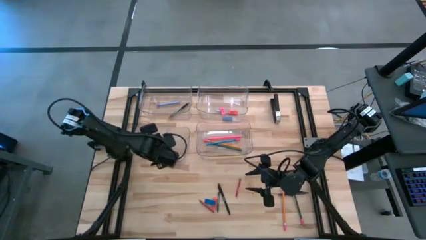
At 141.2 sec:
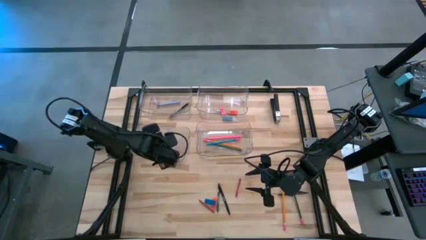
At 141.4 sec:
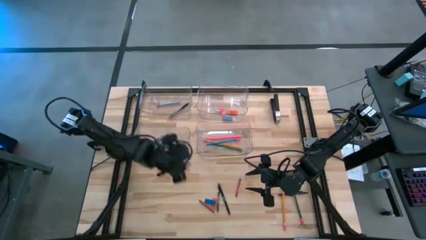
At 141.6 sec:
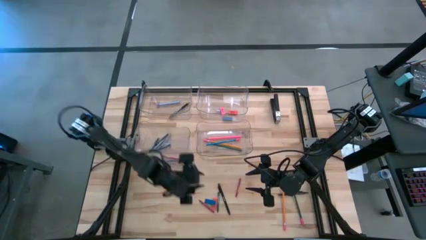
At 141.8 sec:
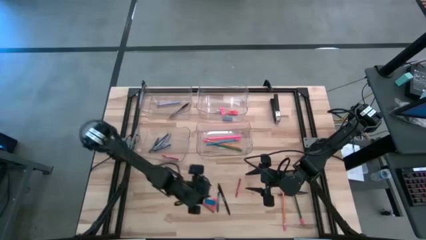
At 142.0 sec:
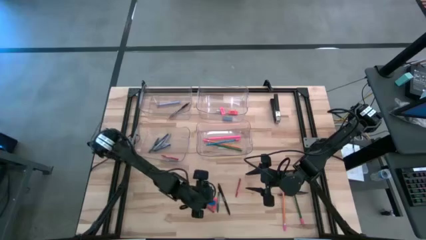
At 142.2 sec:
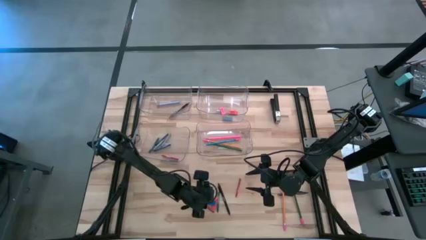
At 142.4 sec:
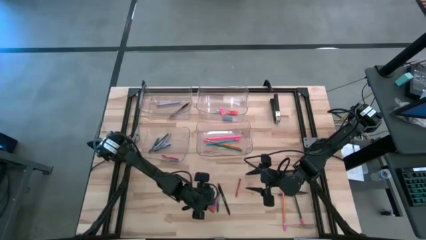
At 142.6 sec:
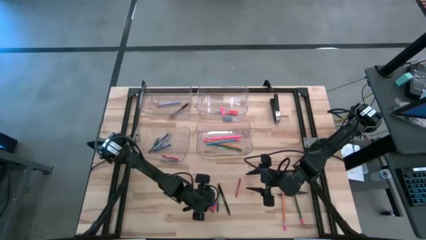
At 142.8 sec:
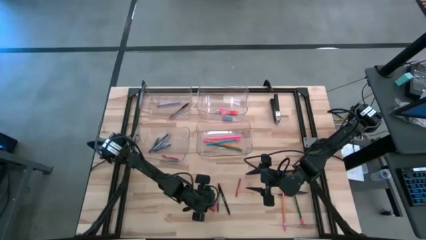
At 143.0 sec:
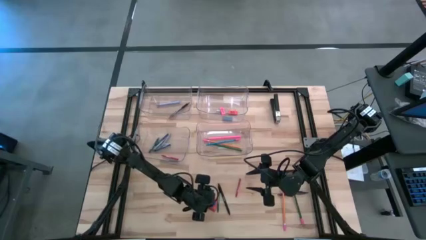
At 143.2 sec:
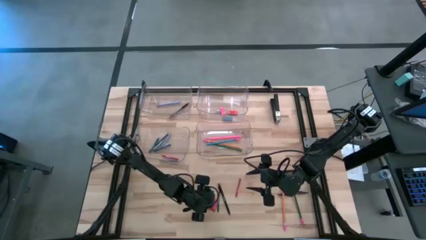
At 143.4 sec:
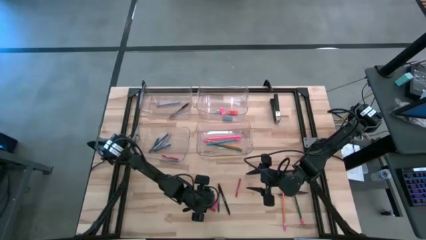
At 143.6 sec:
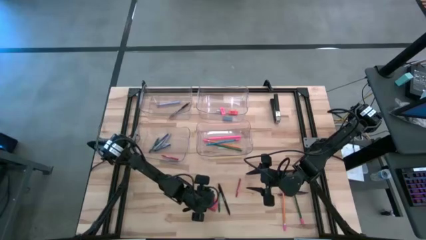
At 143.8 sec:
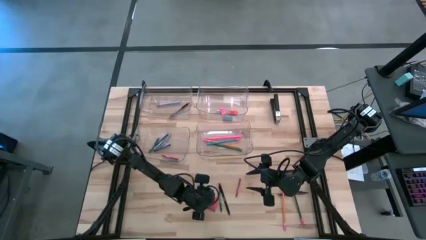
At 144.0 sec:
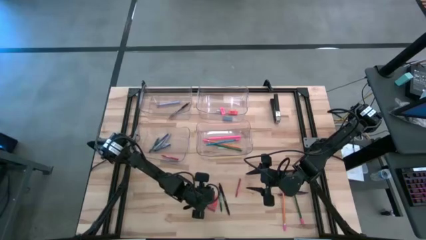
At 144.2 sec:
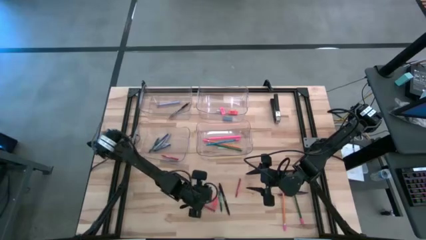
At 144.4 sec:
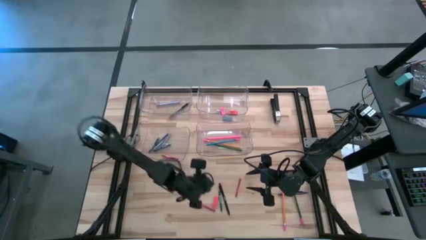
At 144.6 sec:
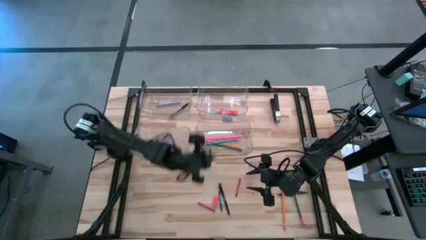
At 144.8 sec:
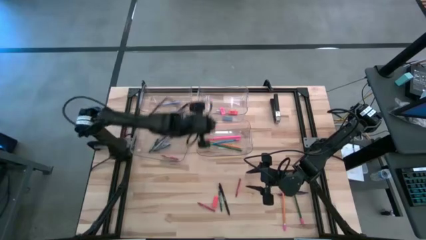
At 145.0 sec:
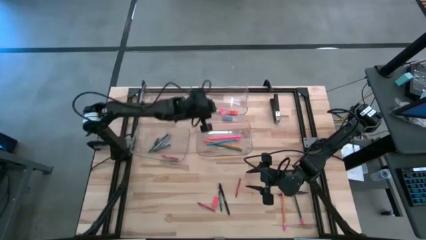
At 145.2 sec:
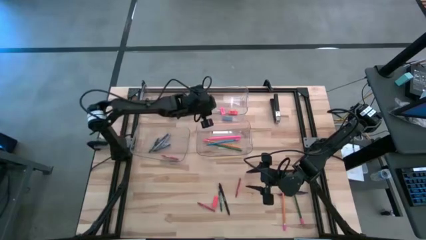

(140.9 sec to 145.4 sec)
Task: Sort crayons/erasers/pens/pencils in bins
Put the blue eraser into the top right transparent bin

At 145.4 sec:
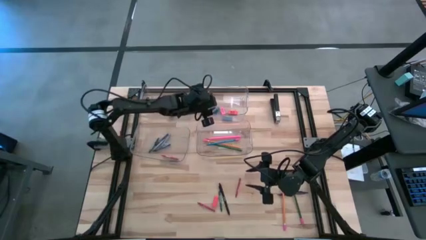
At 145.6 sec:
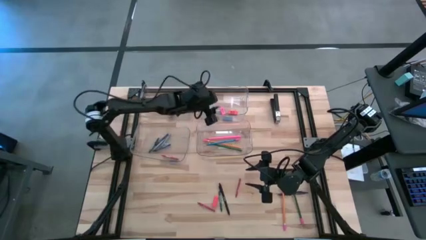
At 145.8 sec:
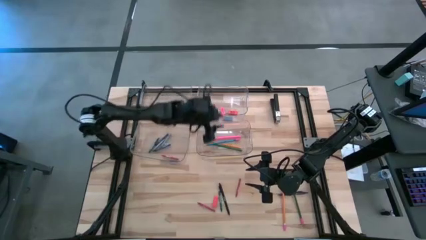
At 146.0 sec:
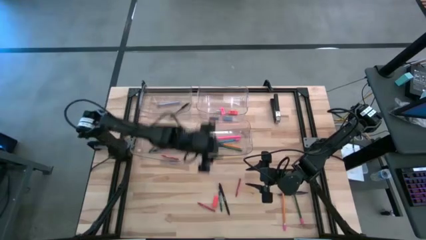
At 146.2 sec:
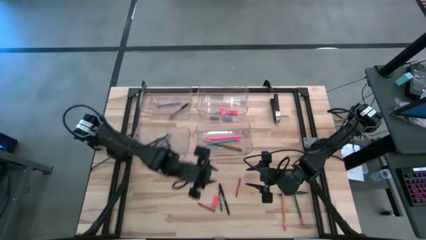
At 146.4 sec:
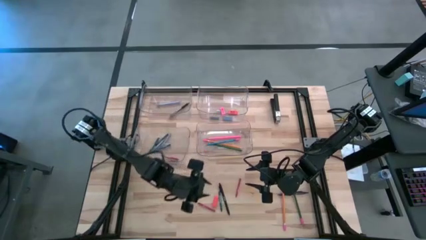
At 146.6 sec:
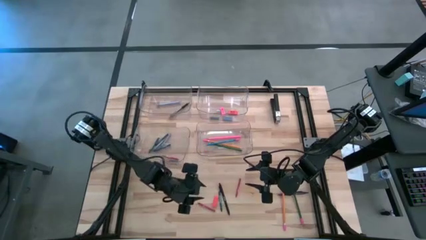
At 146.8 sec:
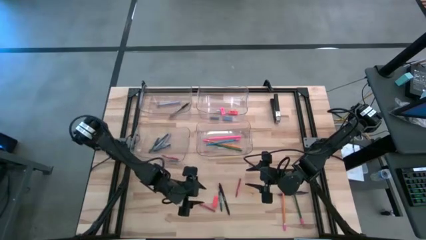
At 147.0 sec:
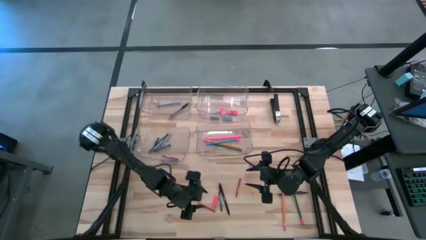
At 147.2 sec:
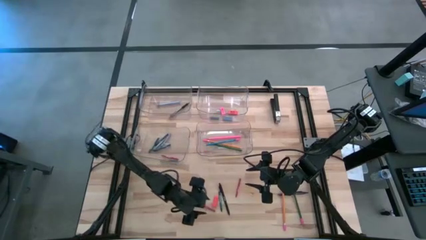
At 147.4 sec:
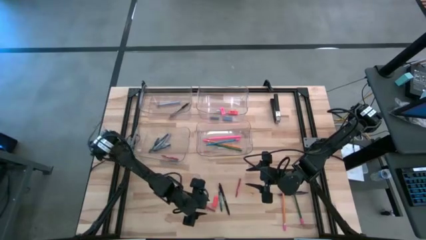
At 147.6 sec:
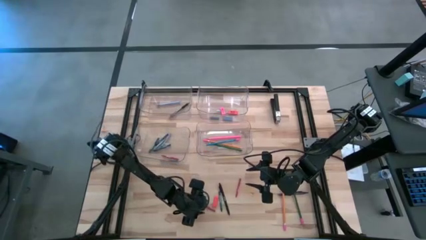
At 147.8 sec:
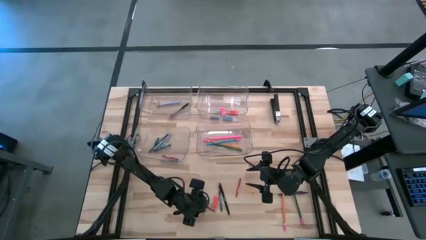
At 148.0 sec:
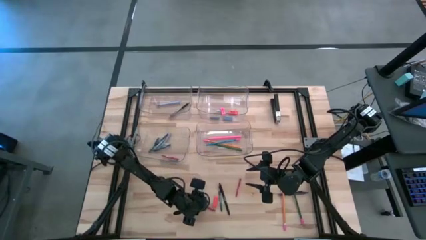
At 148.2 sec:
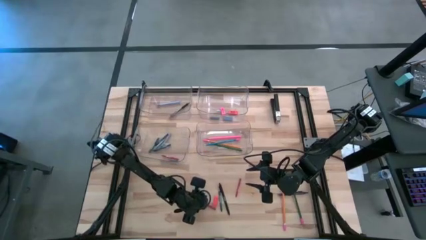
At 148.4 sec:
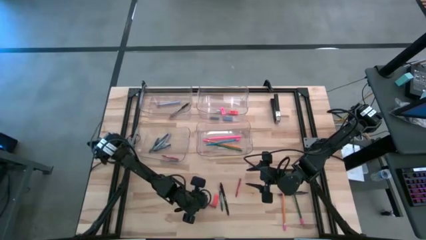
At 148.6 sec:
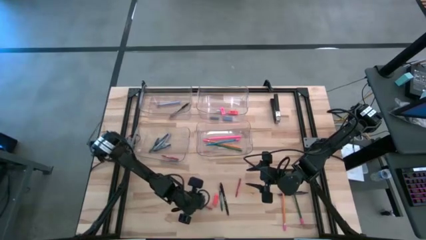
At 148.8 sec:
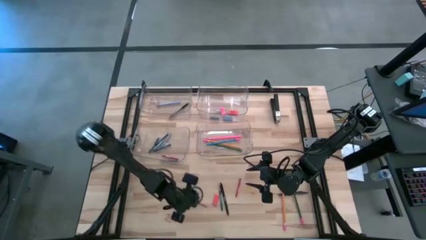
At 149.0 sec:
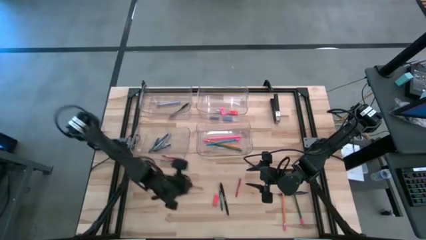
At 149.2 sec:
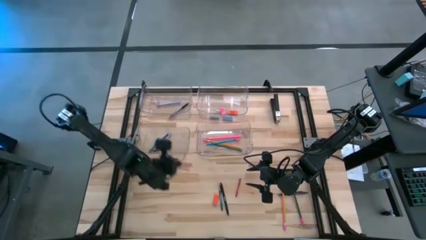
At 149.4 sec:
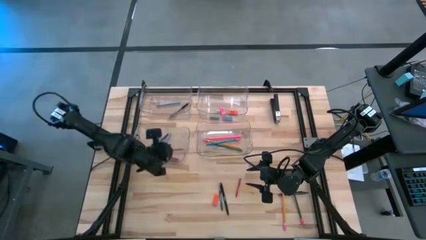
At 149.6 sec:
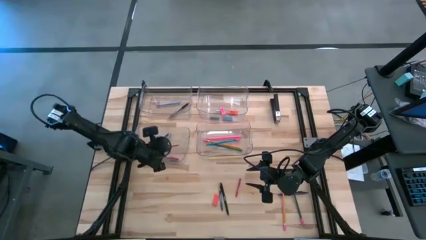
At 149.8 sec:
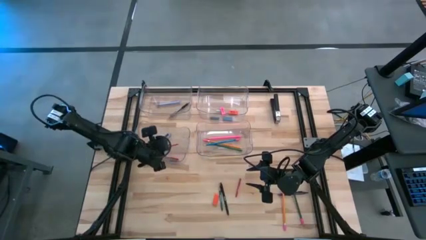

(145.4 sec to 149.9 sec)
Put the left red crayon into the bottom left transparent bin

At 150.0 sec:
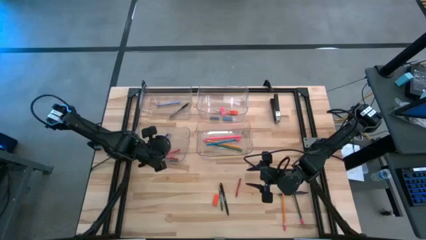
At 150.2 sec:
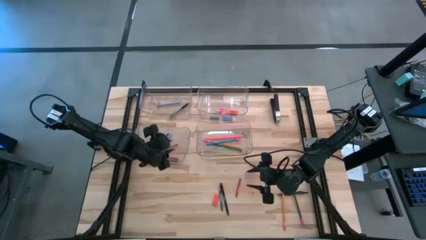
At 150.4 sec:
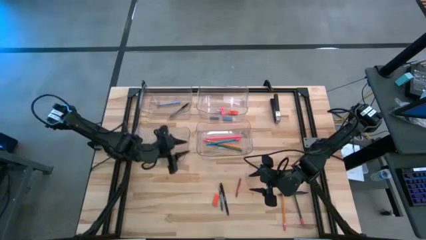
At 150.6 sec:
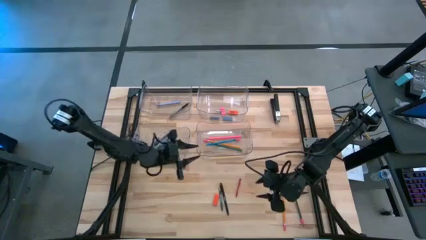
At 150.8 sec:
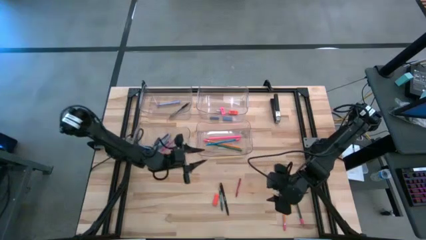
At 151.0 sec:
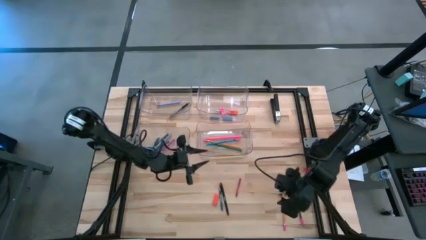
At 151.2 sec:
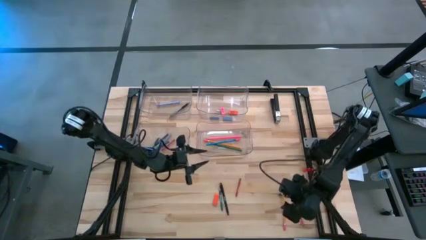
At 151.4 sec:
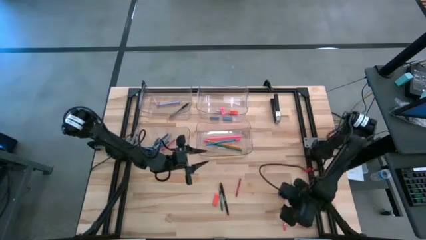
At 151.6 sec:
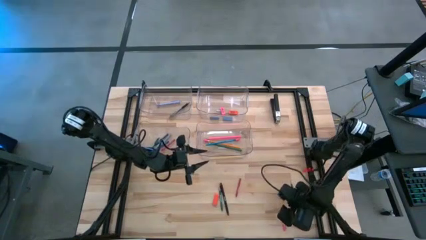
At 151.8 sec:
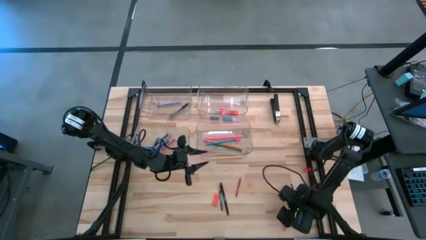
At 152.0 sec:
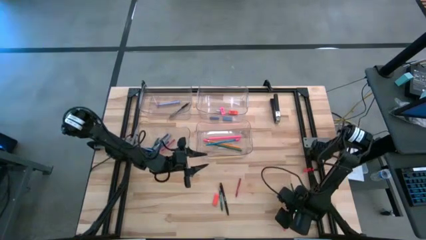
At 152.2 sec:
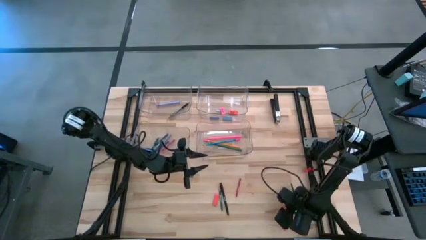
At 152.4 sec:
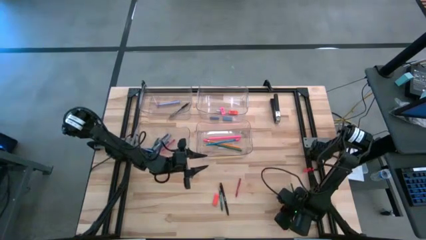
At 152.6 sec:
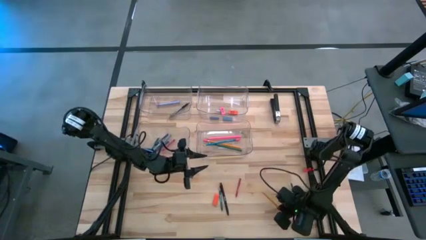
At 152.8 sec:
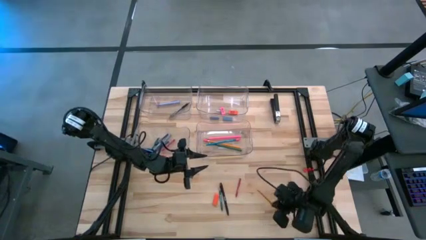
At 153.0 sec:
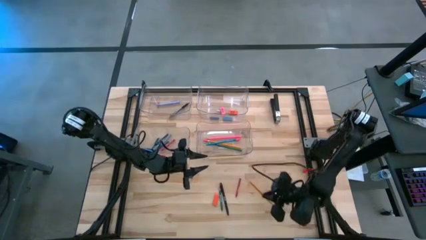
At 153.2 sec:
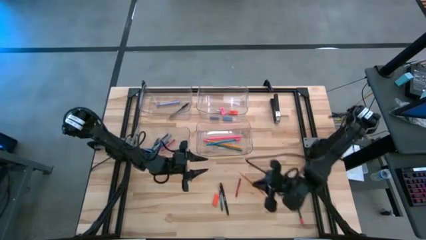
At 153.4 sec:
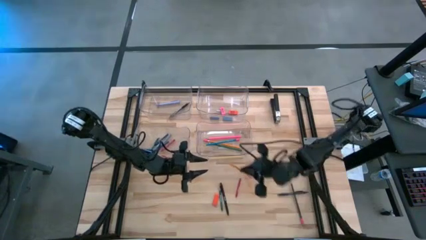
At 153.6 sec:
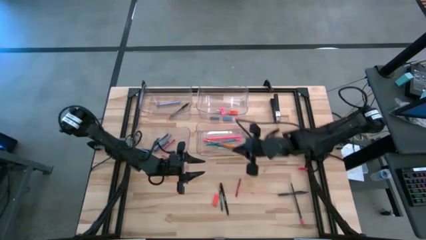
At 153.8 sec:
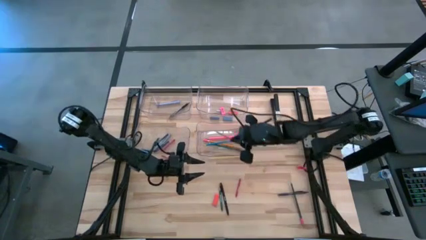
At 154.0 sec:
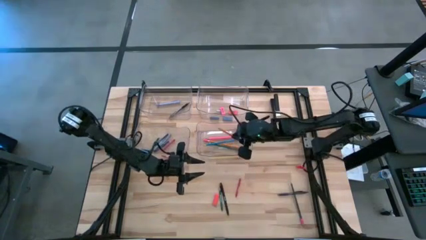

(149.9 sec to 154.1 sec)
Put the orange pencil into the bottom right transparent bin

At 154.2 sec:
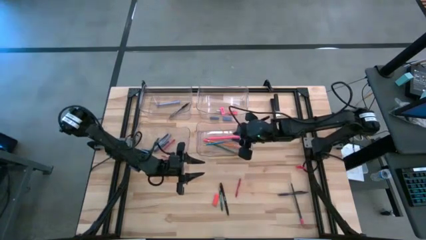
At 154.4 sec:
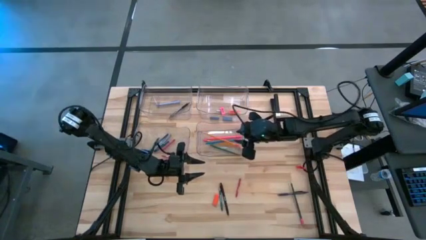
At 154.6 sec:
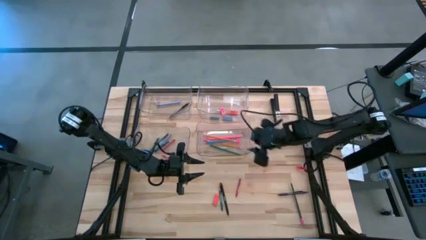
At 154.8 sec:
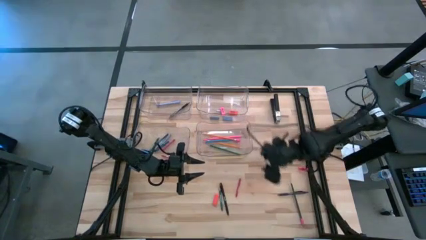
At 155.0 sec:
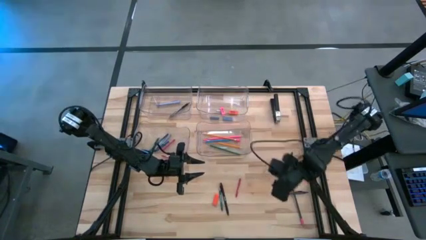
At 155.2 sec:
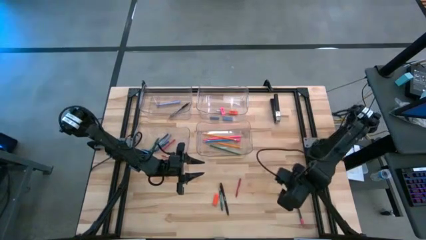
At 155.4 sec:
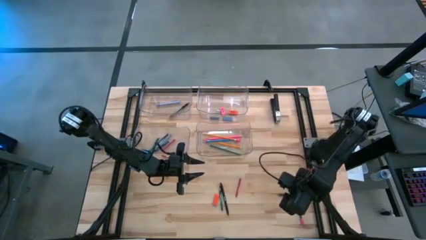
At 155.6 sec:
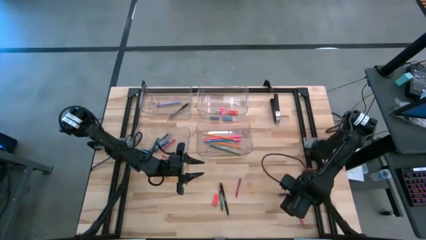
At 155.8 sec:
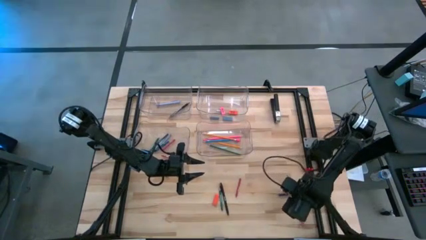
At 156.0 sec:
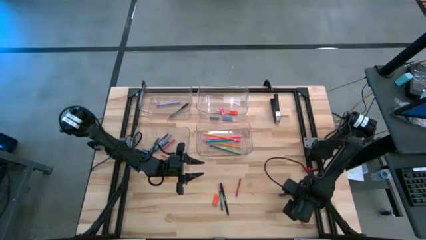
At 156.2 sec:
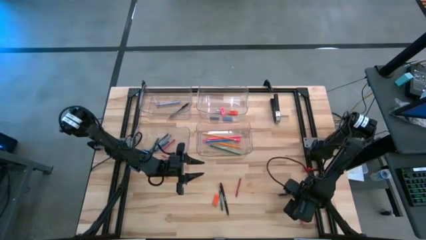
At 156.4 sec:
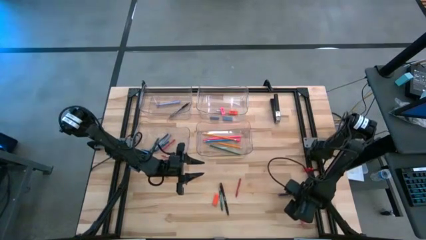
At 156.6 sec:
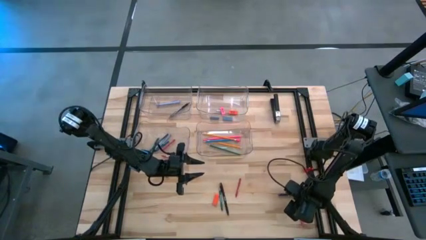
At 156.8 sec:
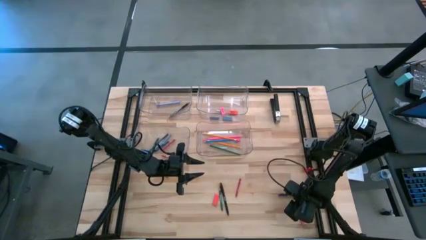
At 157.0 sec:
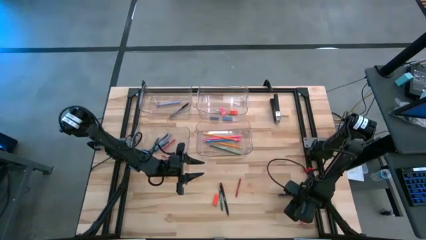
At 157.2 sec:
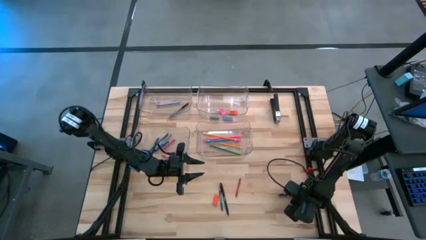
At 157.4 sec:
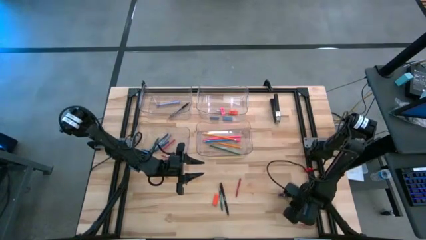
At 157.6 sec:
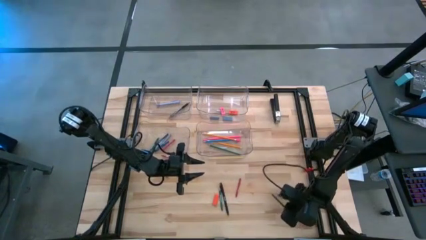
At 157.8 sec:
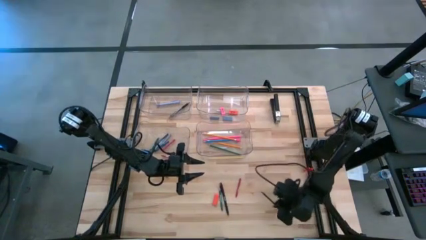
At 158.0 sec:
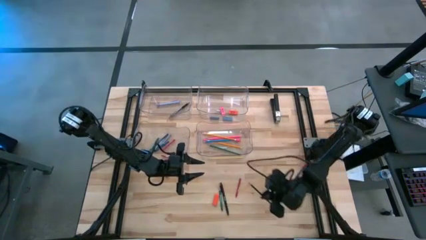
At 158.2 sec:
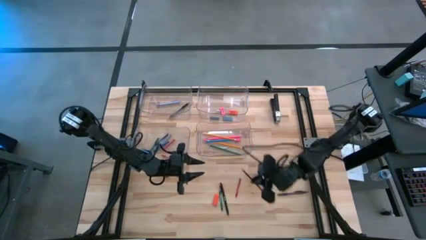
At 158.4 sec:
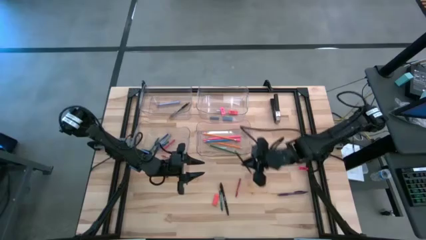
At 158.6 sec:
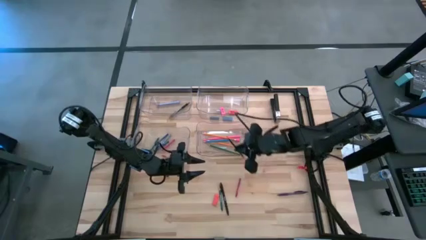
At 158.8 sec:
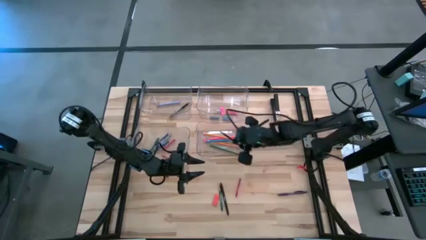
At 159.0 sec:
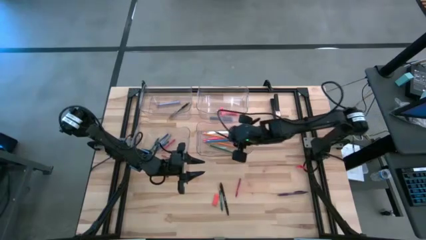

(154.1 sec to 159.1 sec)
Put the green pencil into the bottom right transparent bin
